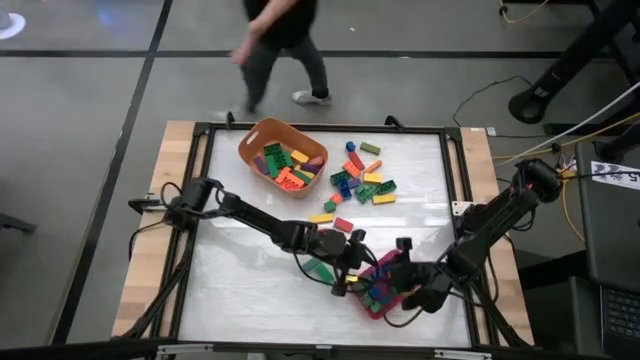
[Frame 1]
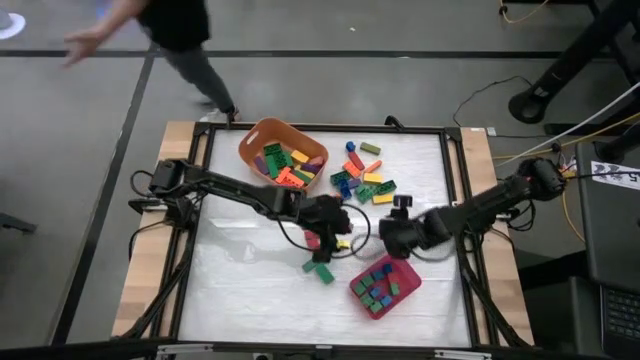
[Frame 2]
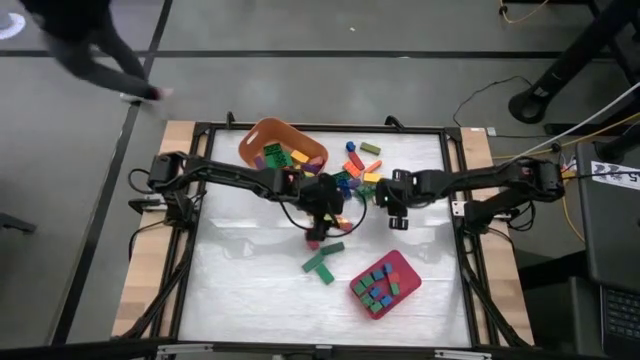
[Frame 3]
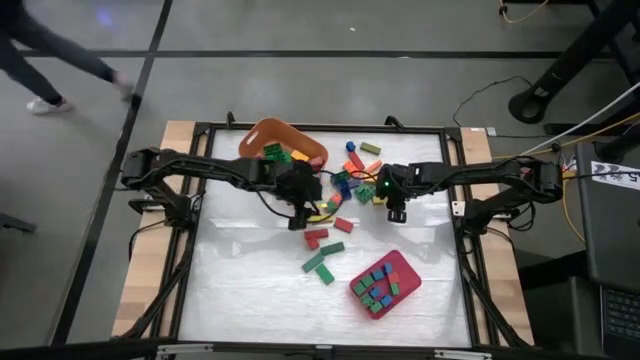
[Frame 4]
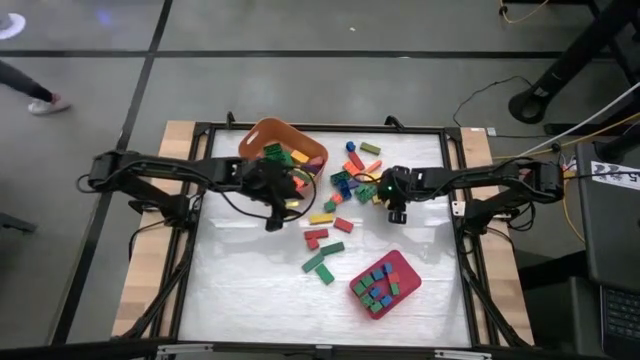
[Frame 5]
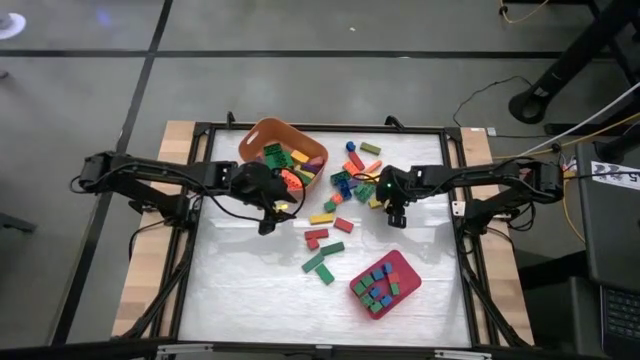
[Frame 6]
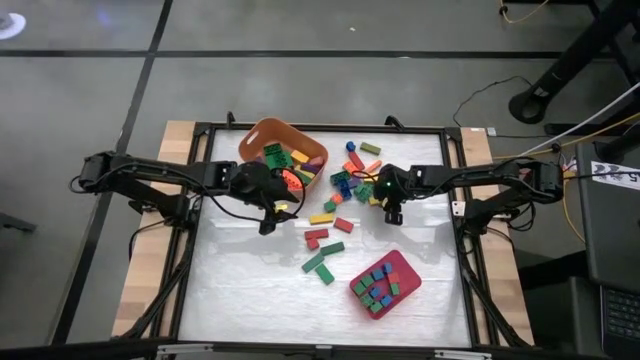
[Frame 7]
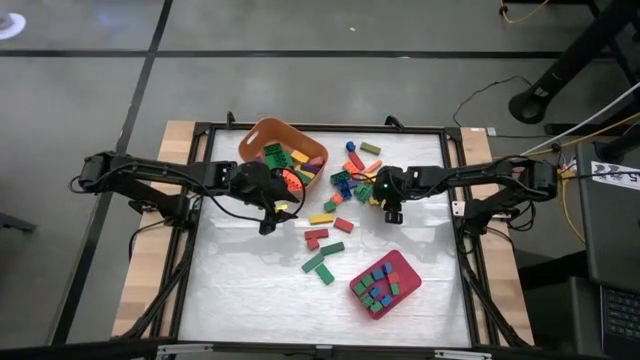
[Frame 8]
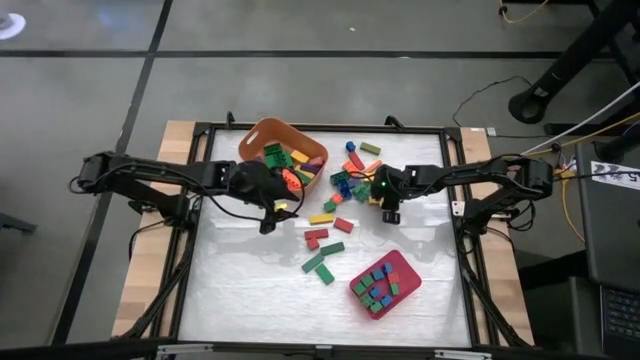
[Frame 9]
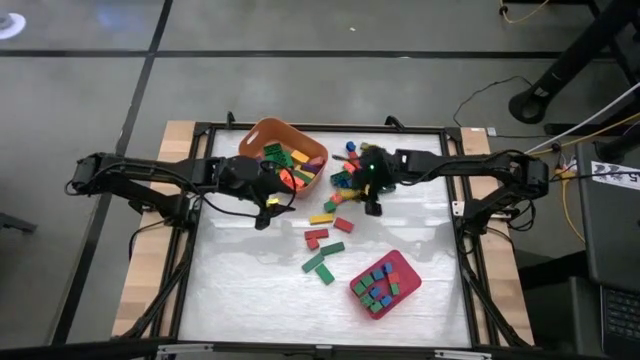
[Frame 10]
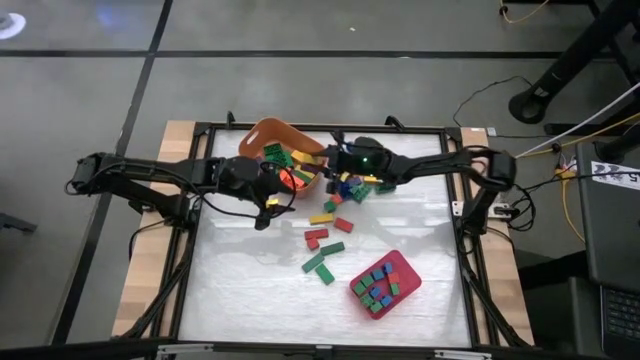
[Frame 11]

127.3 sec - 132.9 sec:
Task: Sort blocks by size
Put the large yellow block into the orange bin

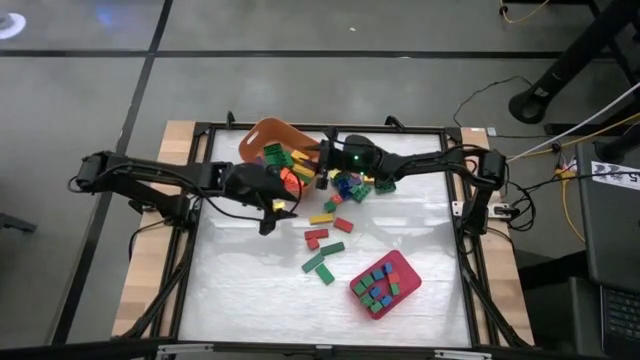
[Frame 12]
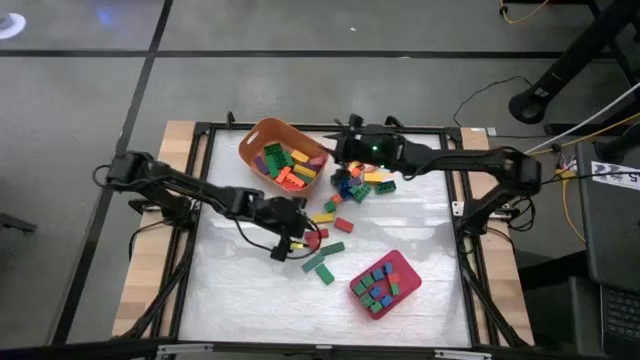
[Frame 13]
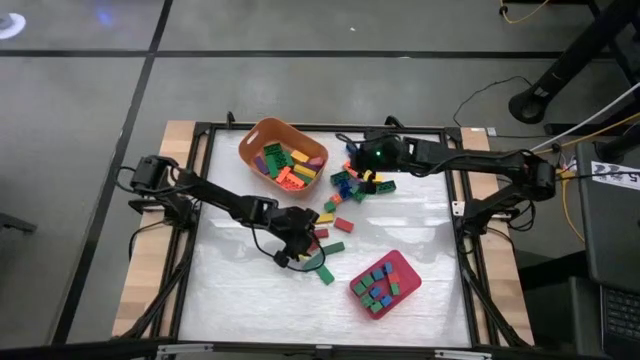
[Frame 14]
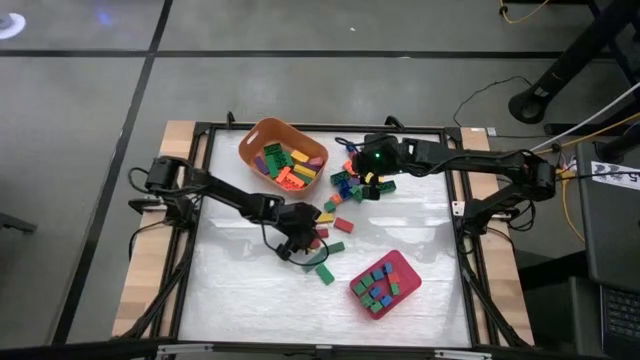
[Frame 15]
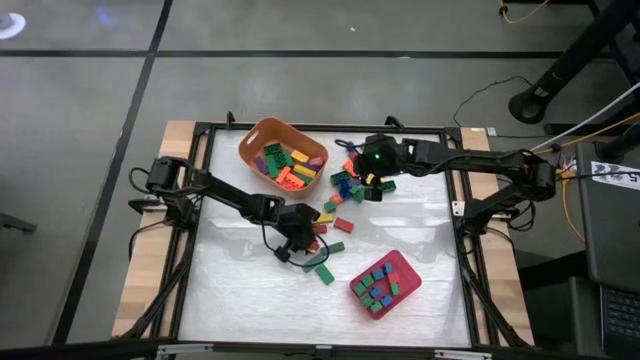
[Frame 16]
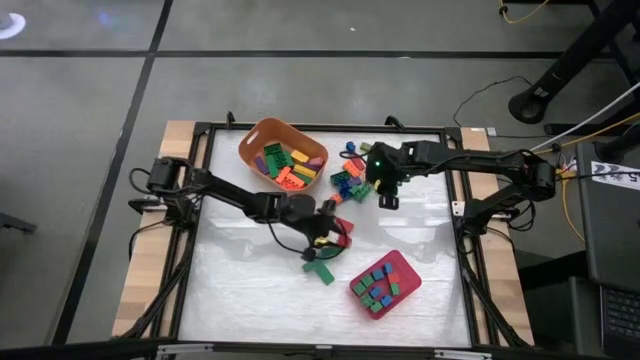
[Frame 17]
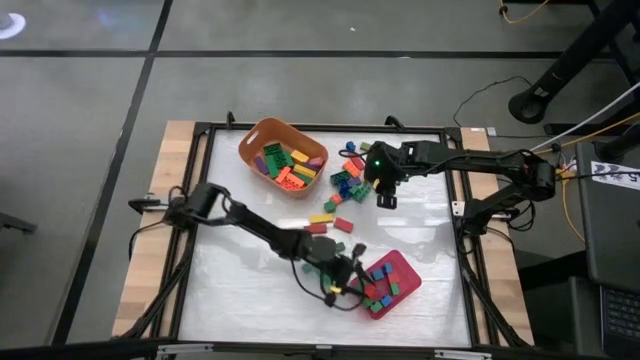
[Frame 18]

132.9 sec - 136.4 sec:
Put the small orange block into the red bin

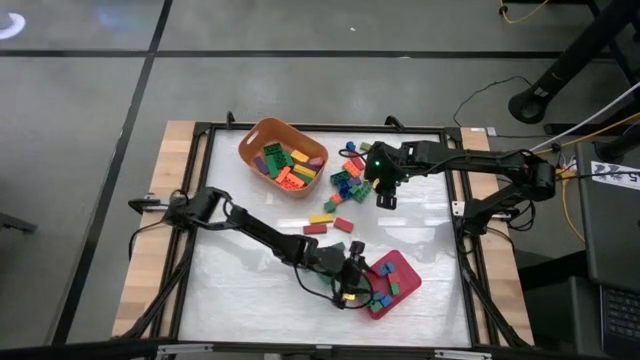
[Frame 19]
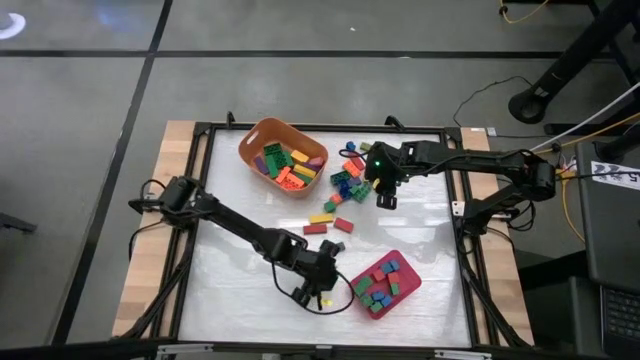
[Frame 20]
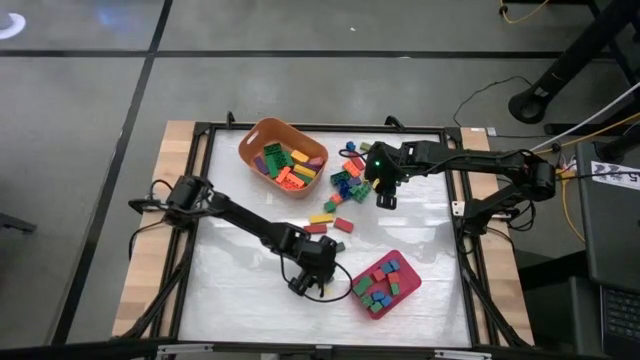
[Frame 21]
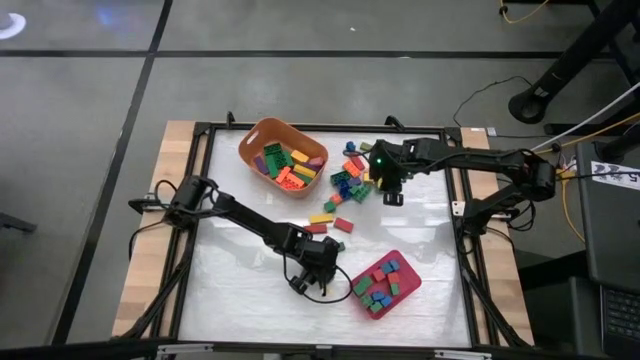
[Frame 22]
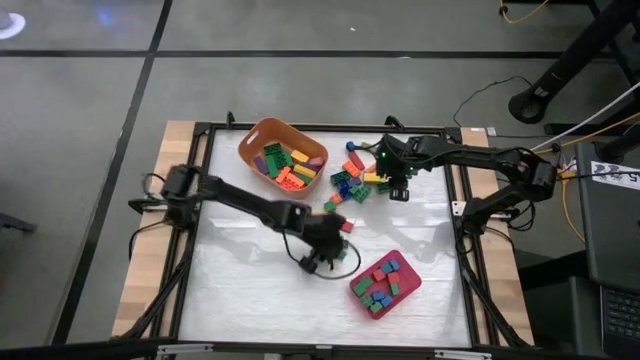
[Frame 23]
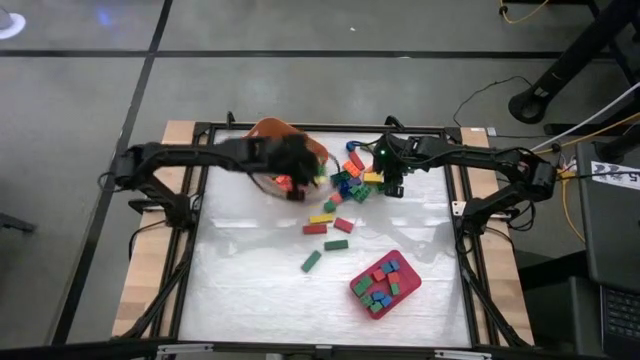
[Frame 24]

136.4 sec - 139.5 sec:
Put the large green block into the orange bin

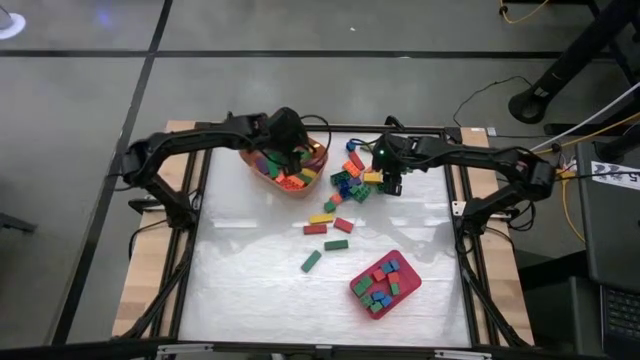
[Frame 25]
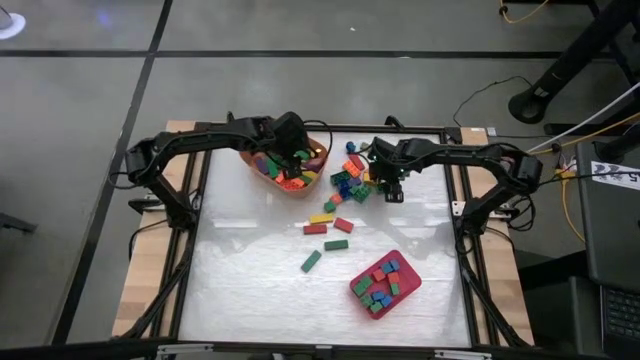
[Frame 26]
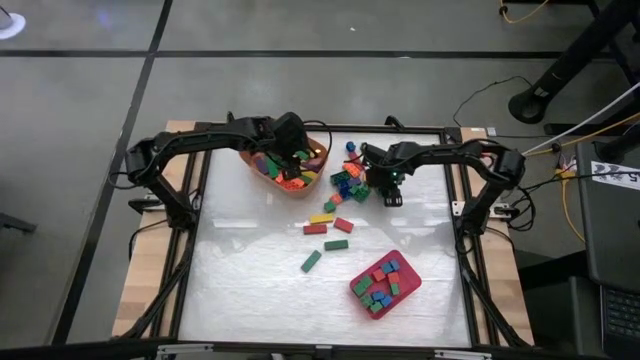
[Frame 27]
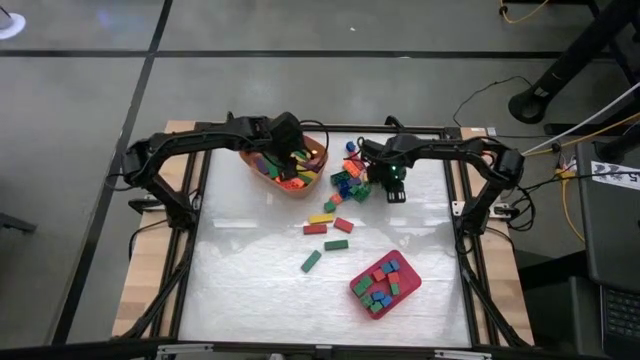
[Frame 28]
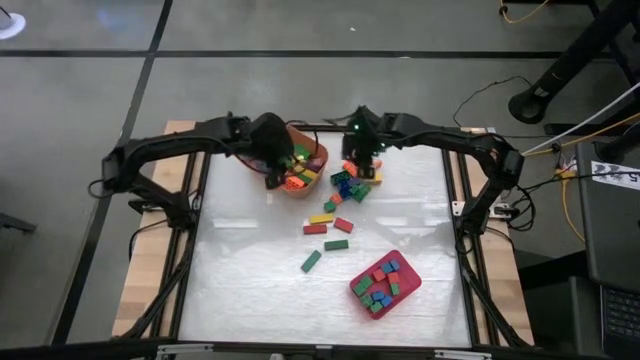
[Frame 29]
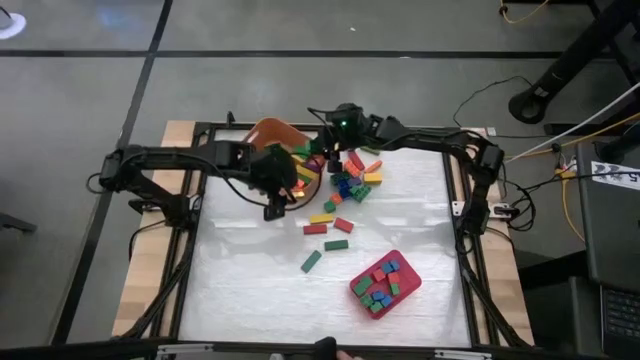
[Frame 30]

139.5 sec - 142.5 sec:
Put the large green game piece into the orange bin

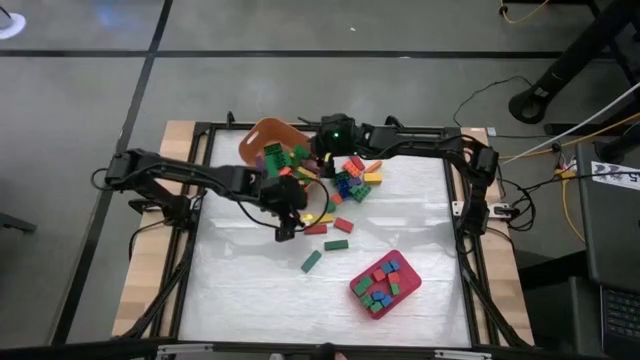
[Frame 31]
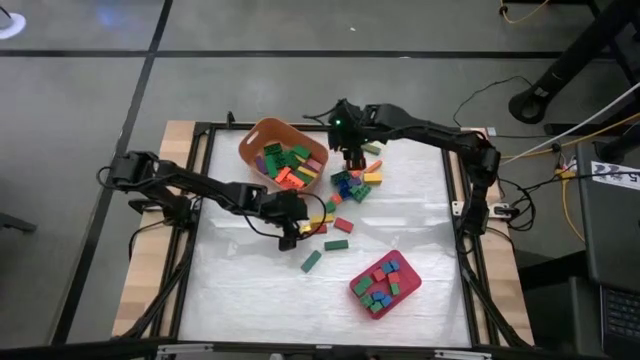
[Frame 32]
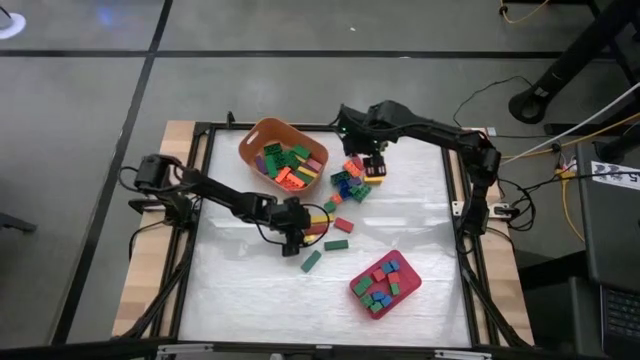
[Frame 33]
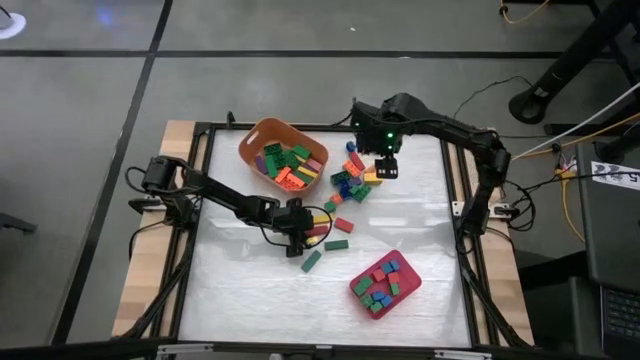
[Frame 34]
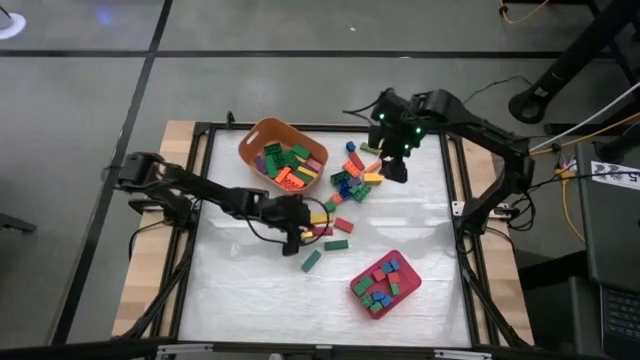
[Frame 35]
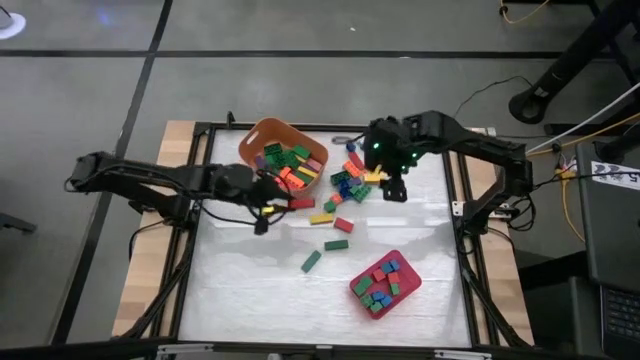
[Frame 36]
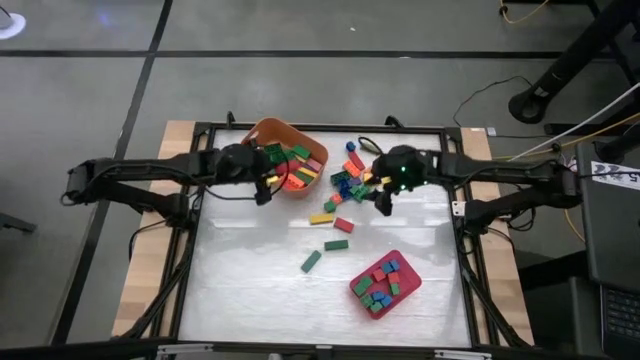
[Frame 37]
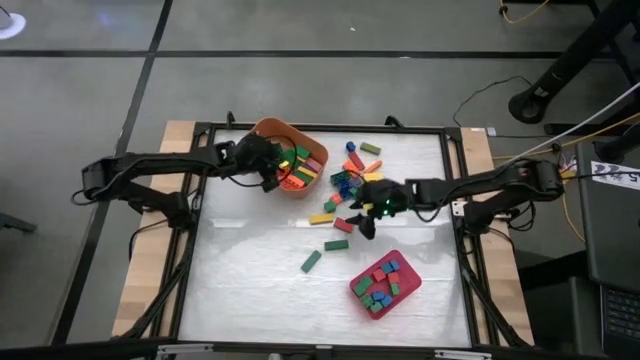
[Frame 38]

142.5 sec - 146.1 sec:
Put the large red block into the orange bin

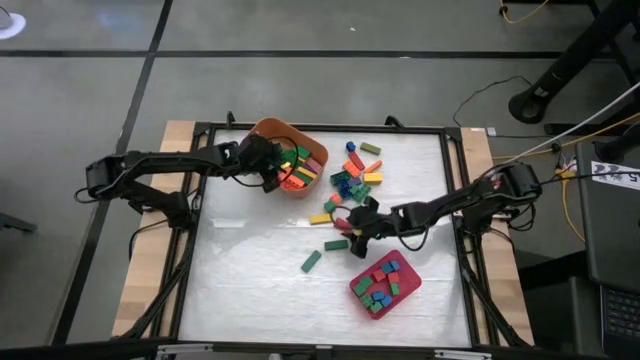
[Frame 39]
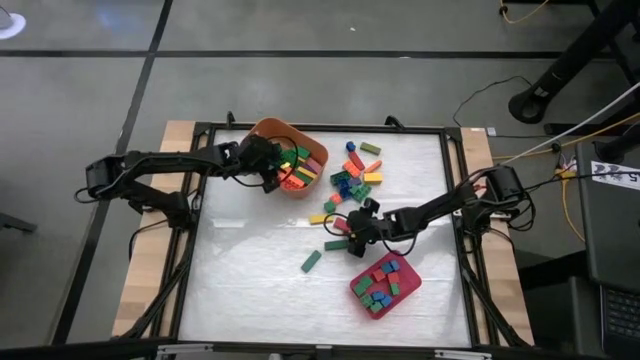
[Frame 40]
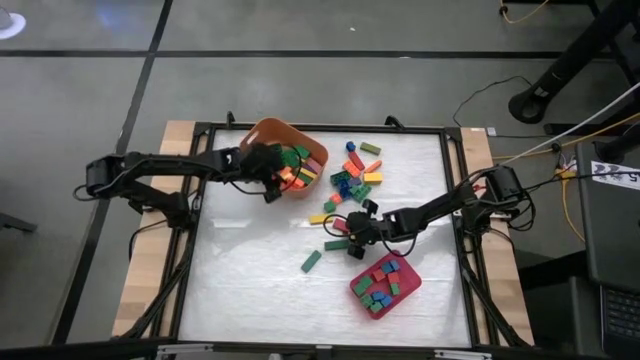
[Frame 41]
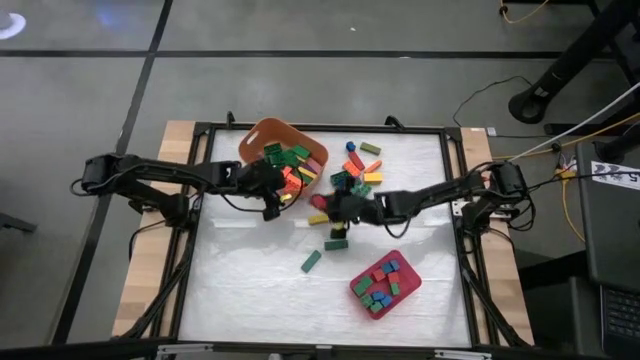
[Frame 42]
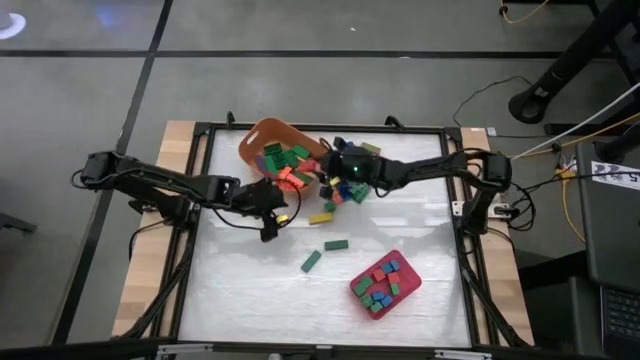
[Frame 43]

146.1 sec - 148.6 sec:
Put the large red block into the orange bin
